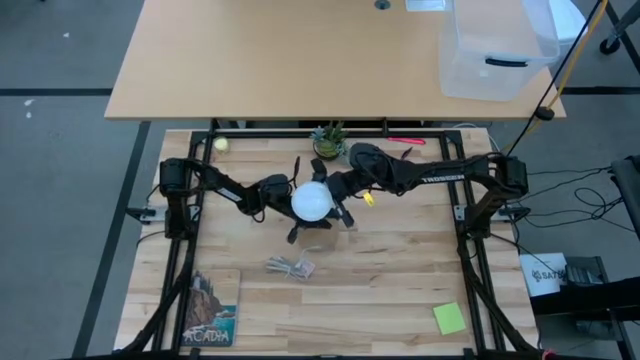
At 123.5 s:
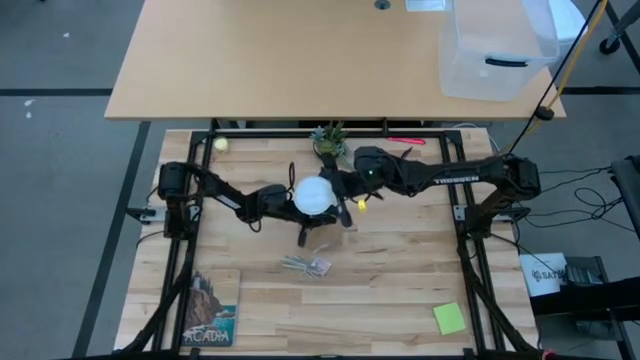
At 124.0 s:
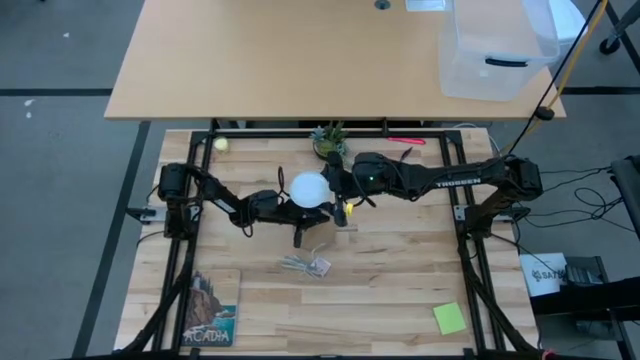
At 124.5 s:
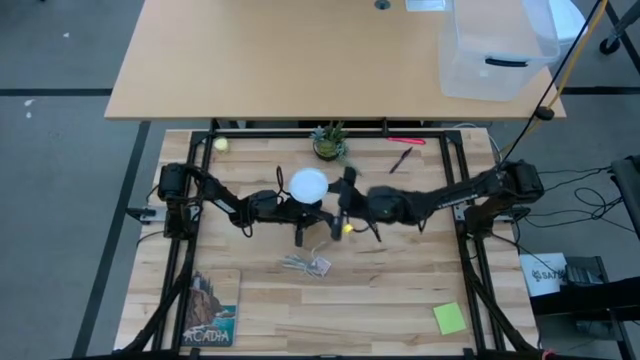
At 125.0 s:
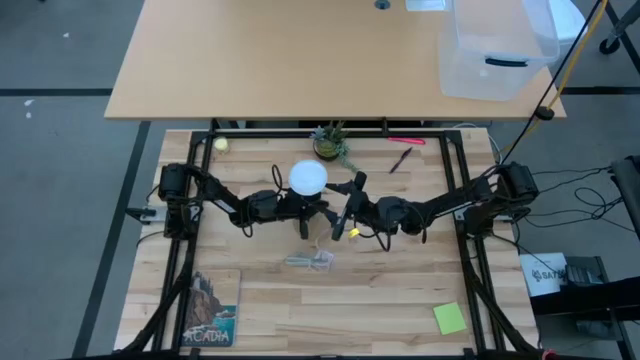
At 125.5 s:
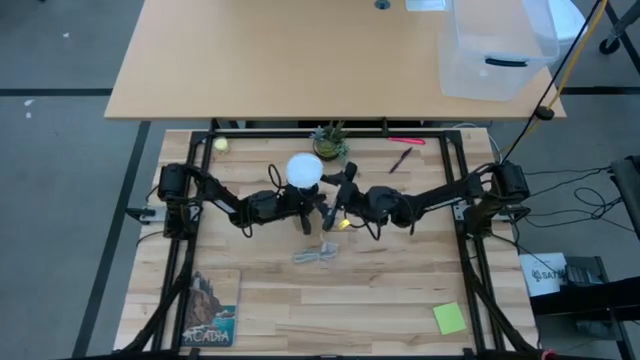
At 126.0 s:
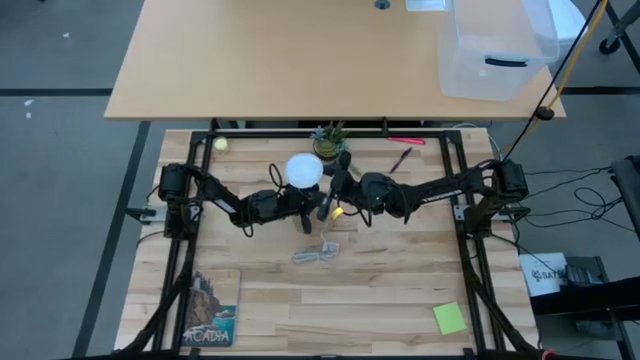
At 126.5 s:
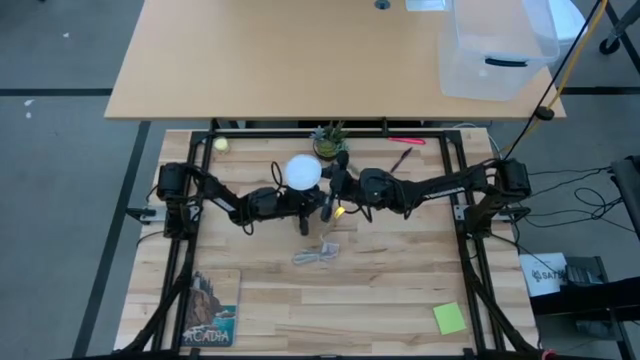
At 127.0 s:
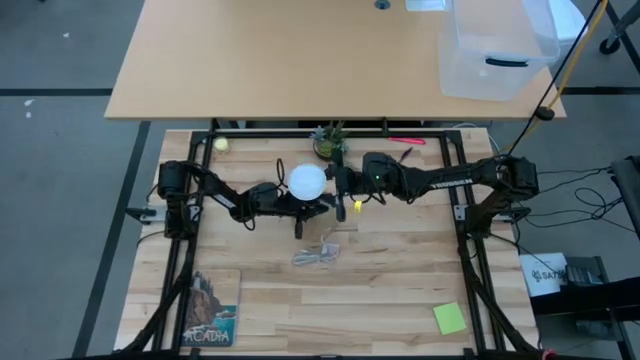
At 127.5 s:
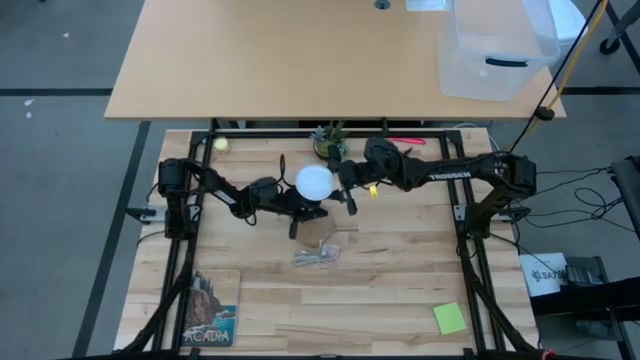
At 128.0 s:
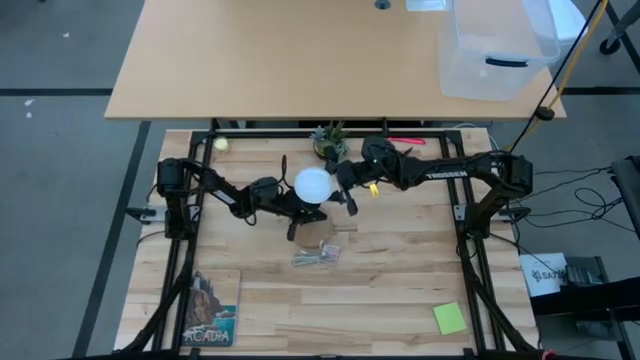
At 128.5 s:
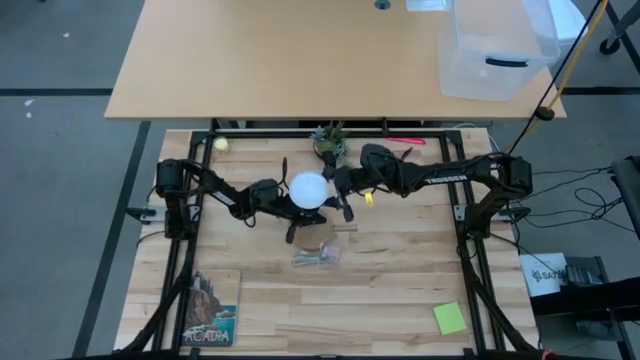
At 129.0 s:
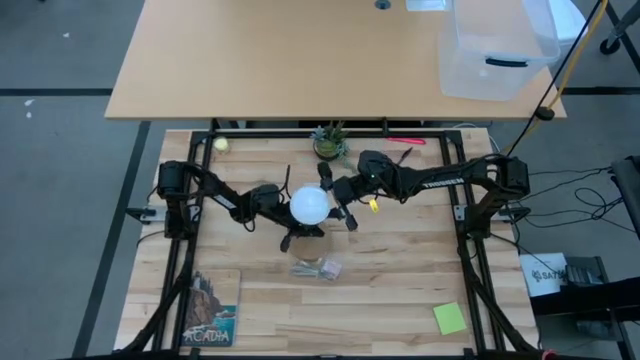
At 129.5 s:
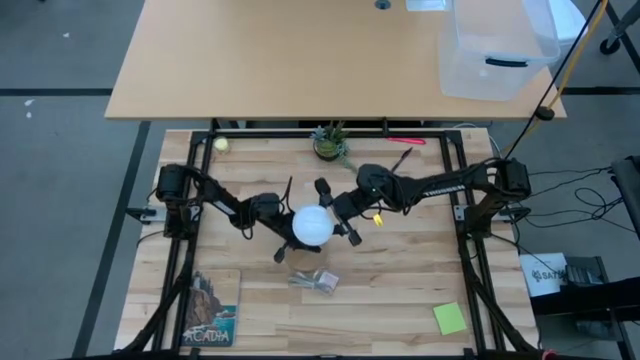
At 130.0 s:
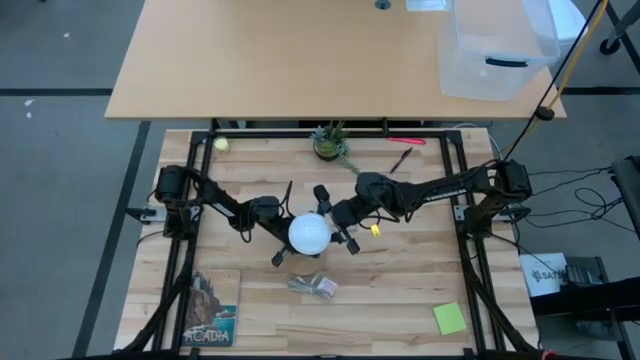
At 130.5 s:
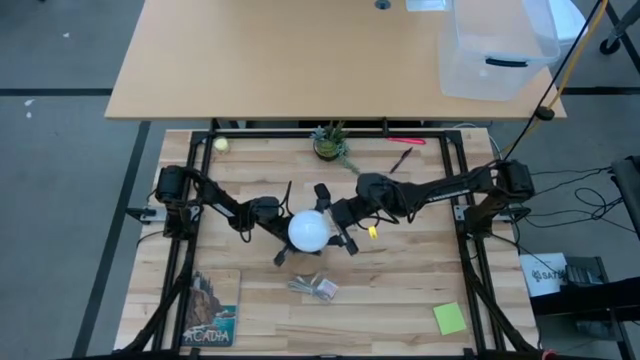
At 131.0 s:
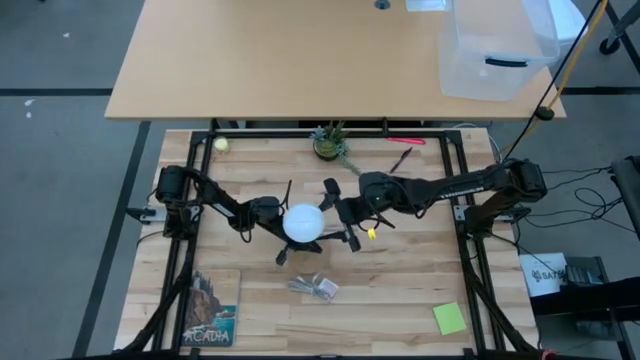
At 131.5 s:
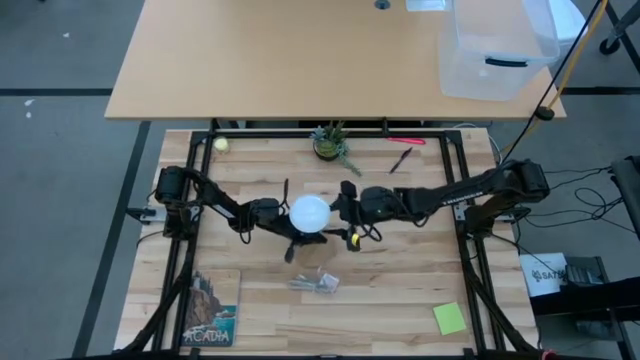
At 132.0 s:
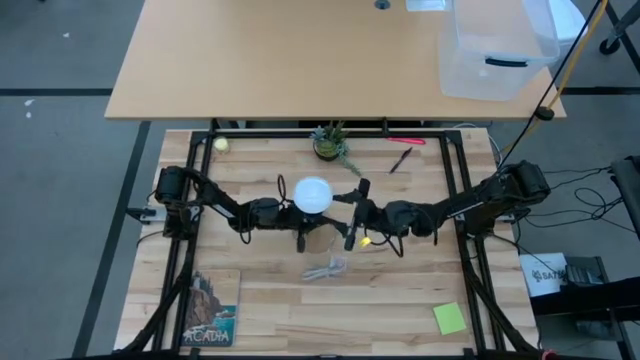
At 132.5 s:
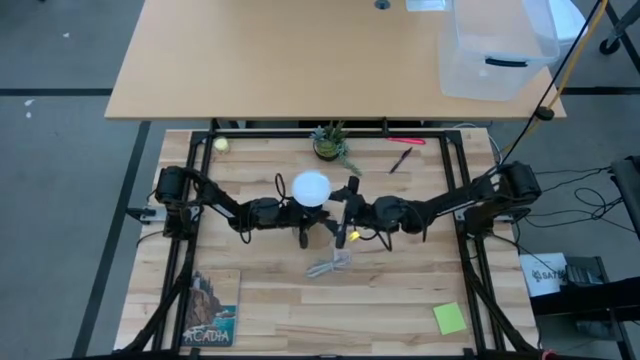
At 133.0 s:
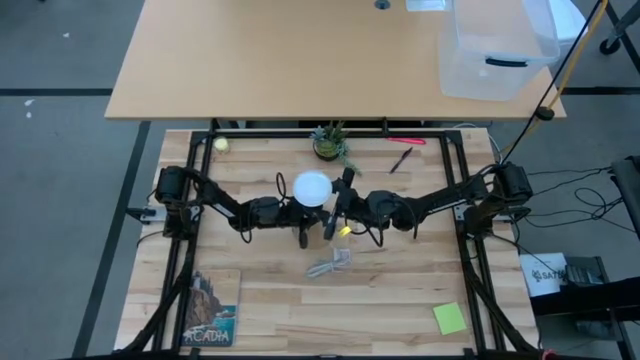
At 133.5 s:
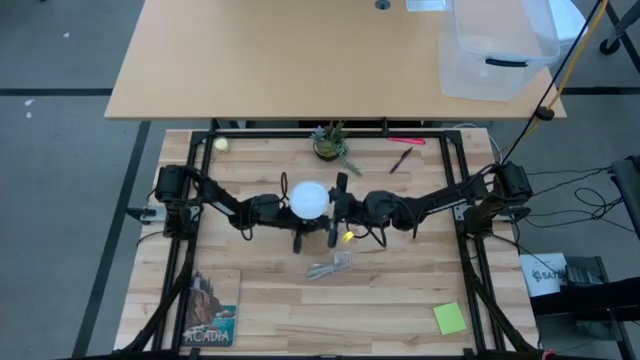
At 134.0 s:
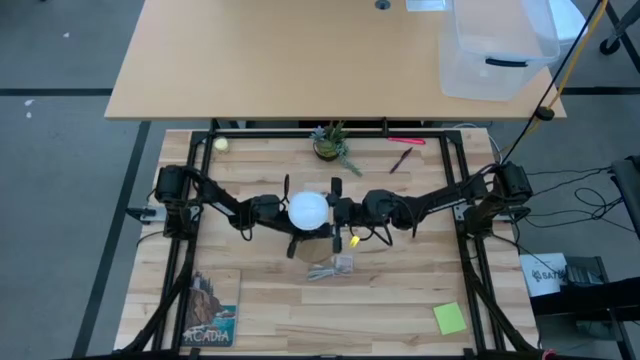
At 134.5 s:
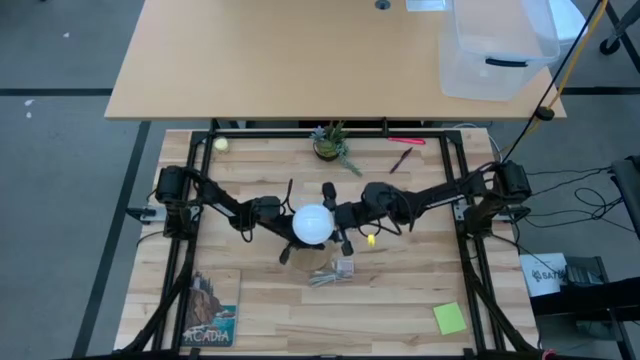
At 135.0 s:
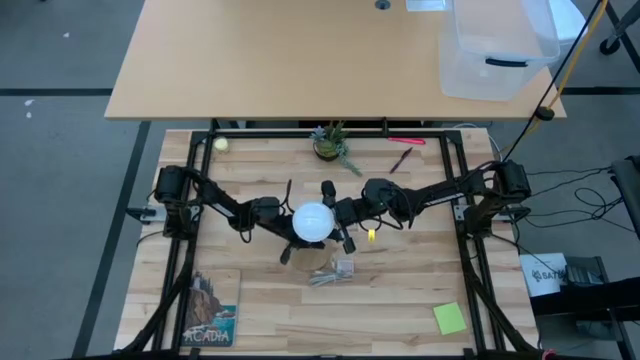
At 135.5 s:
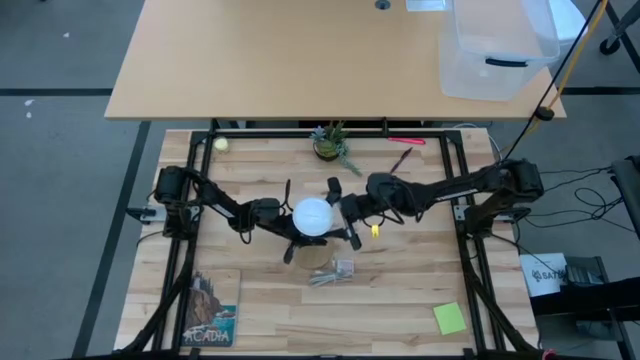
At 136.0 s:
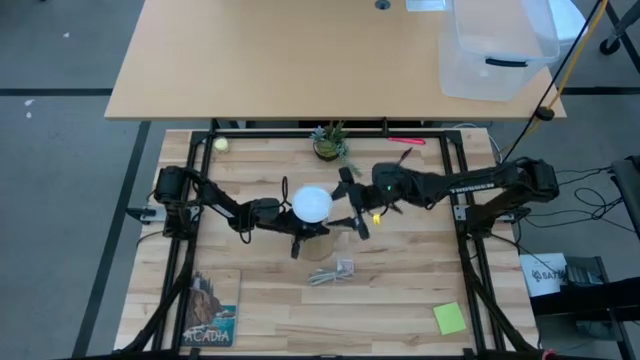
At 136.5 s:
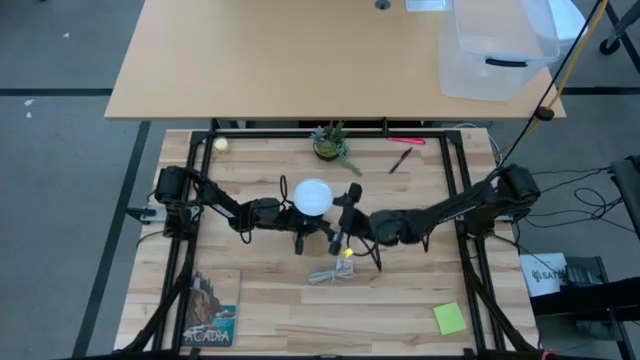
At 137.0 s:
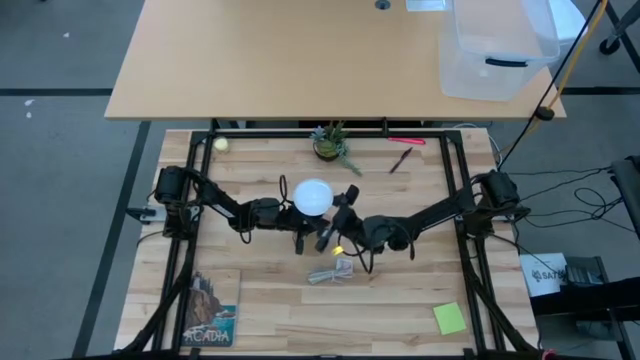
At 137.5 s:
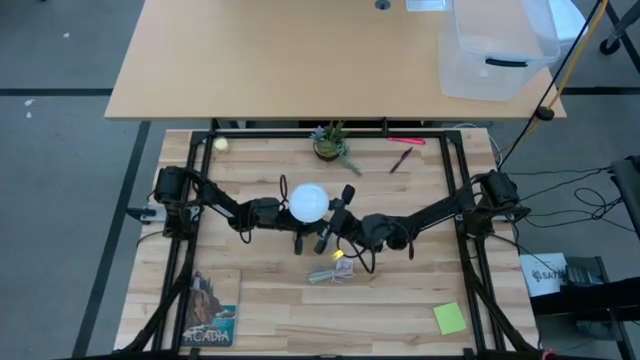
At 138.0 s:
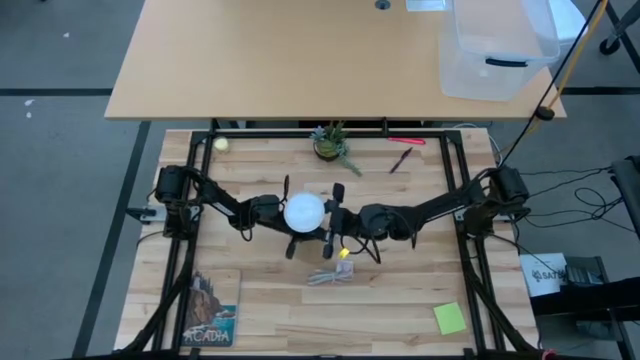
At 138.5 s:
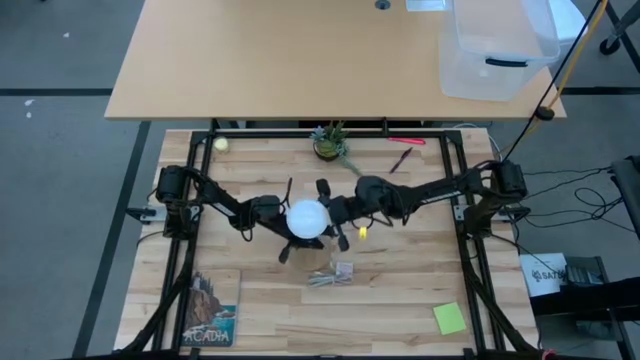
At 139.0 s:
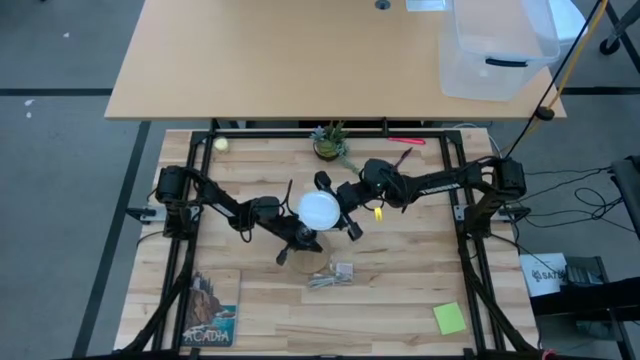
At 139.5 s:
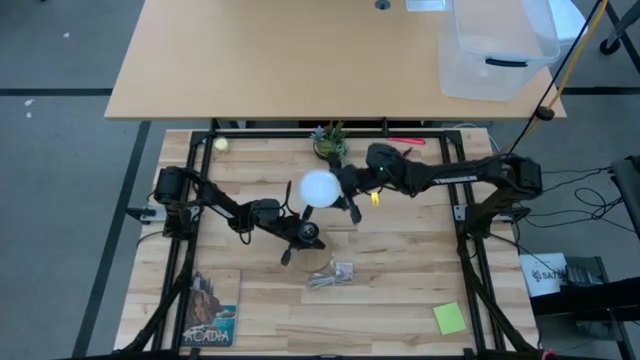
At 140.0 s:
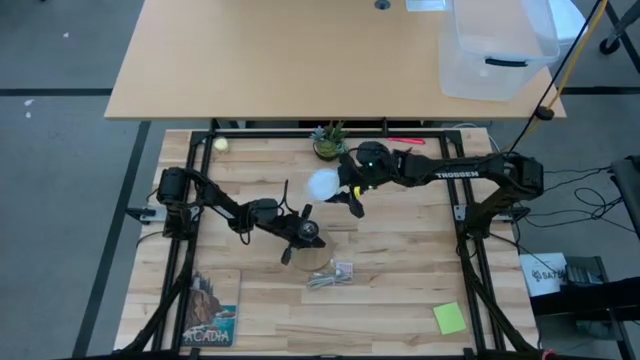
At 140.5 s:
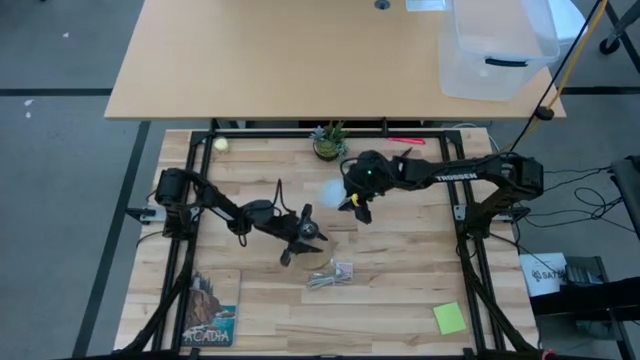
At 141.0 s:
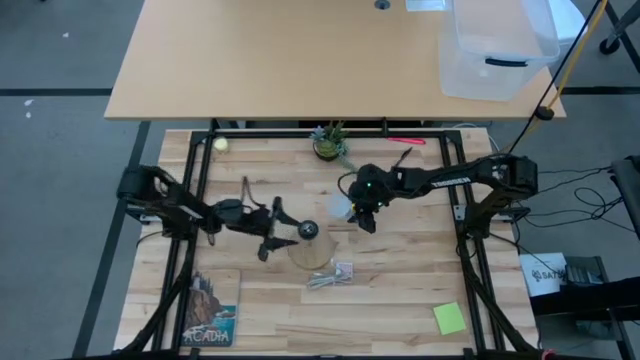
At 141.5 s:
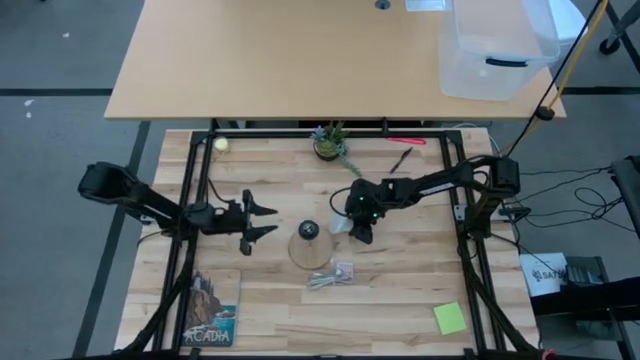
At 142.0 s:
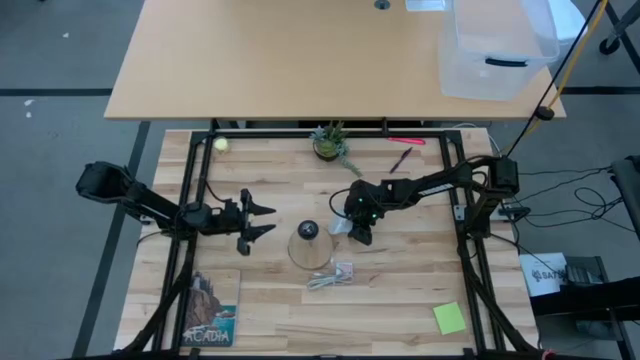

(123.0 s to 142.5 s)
Task: Screw lightbulb
Remove the lightbulb from the lamp

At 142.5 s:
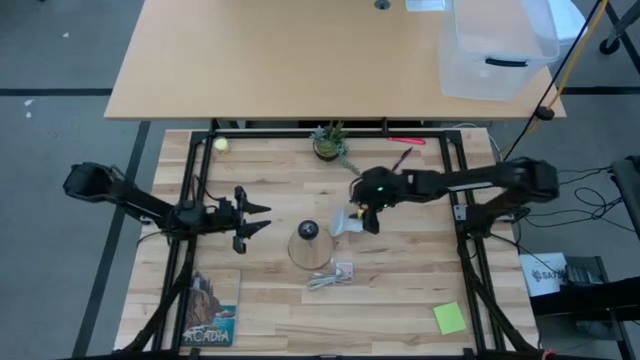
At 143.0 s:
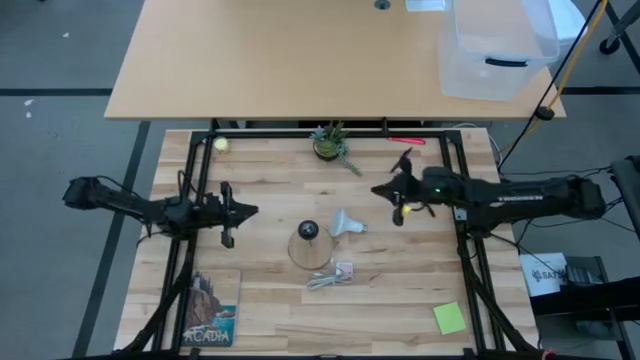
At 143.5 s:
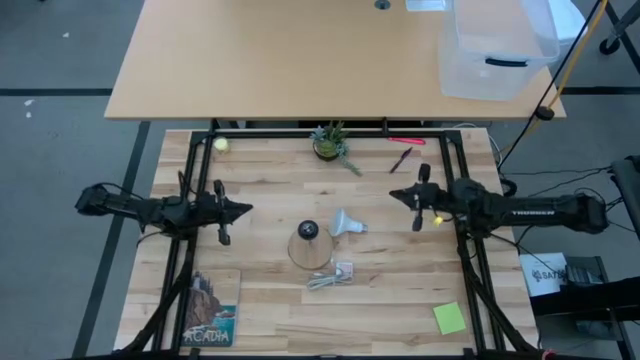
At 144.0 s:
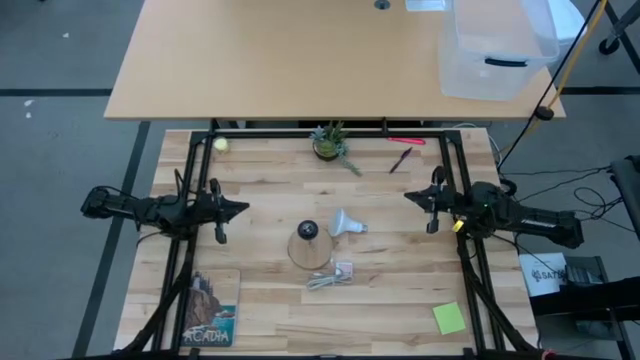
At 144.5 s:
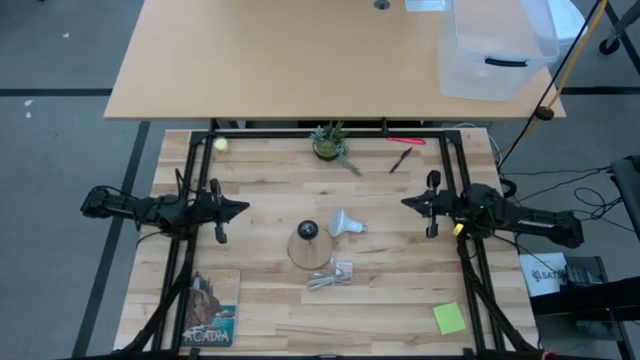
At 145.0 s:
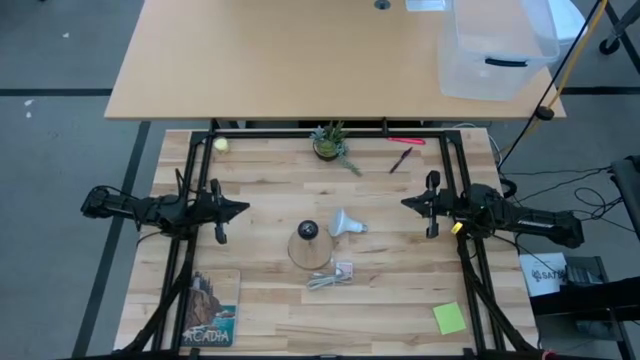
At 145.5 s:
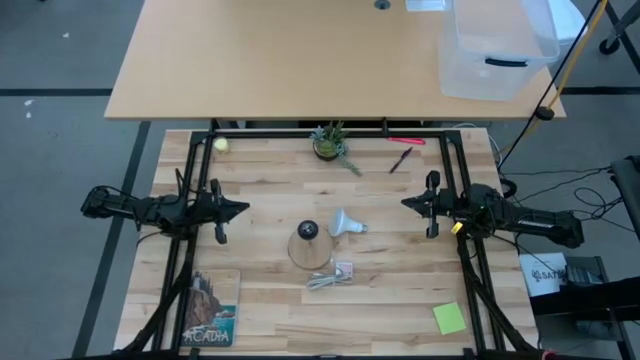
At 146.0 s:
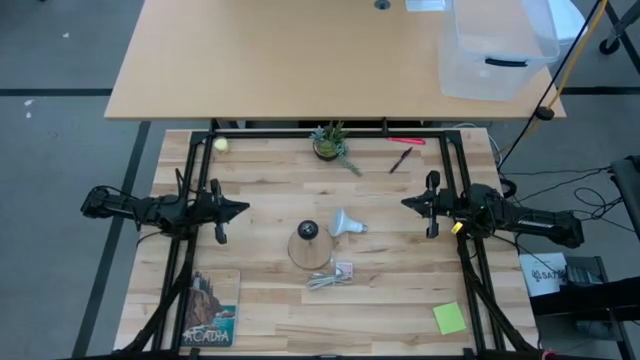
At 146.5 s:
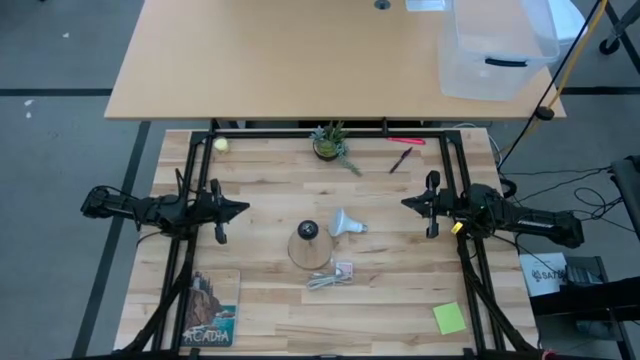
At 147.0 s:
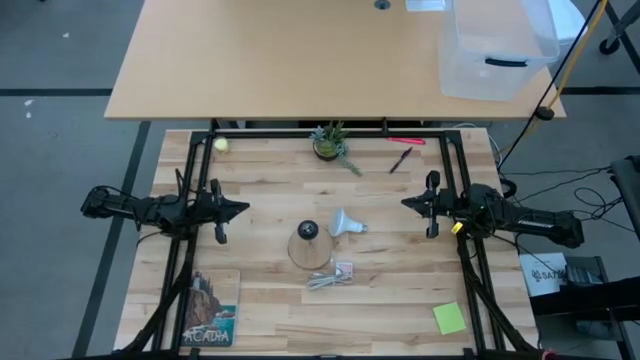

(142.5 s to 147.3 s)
Return to Home Position
